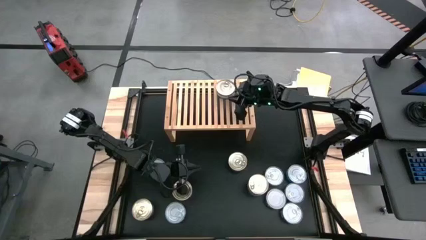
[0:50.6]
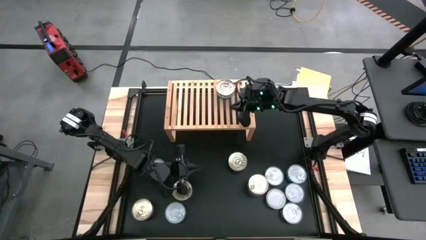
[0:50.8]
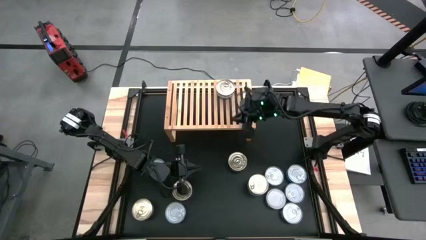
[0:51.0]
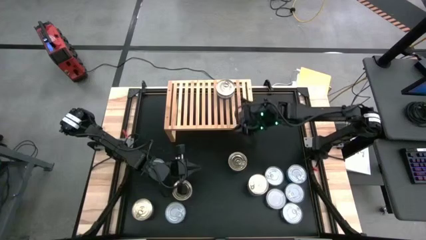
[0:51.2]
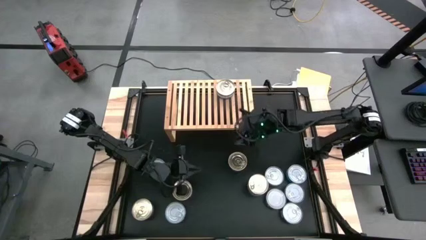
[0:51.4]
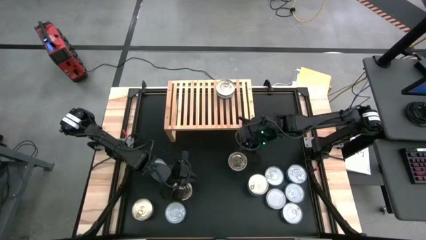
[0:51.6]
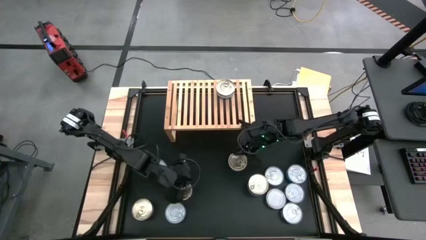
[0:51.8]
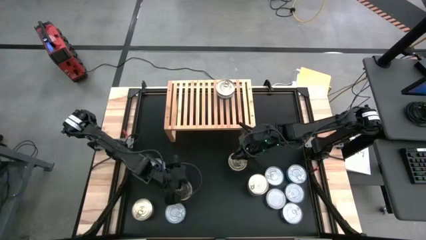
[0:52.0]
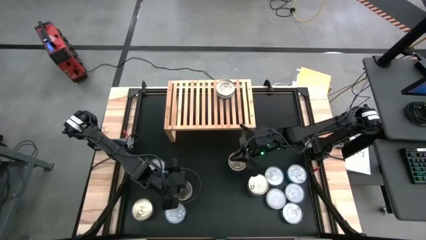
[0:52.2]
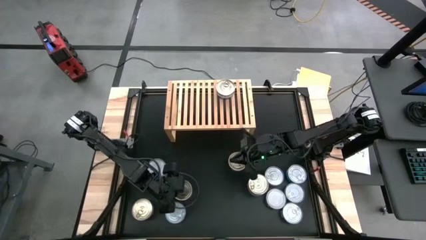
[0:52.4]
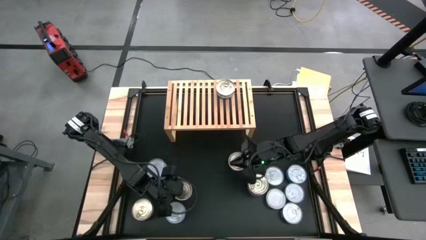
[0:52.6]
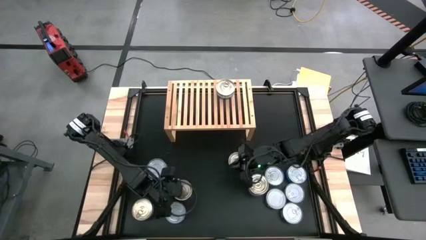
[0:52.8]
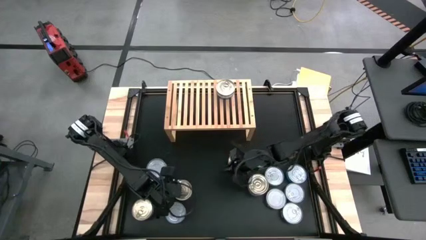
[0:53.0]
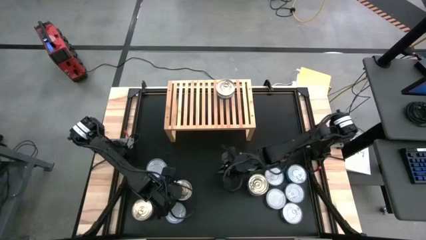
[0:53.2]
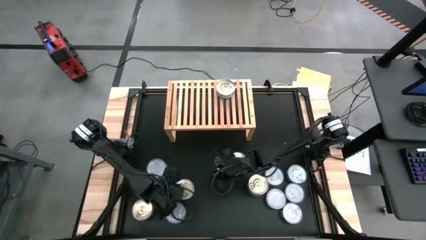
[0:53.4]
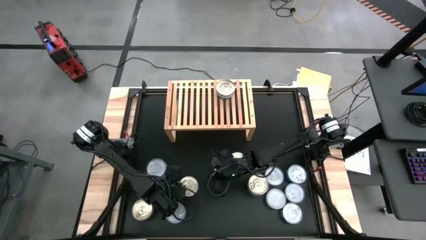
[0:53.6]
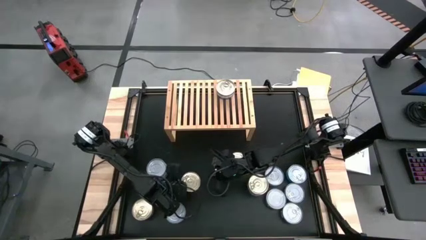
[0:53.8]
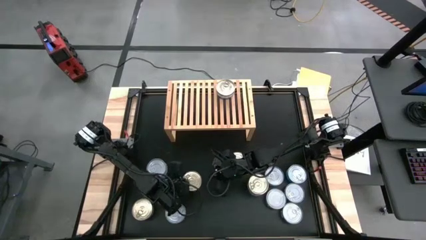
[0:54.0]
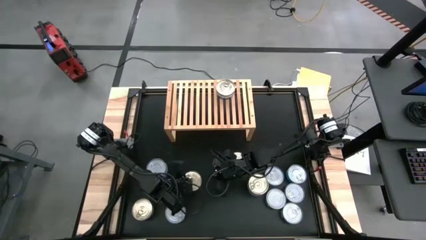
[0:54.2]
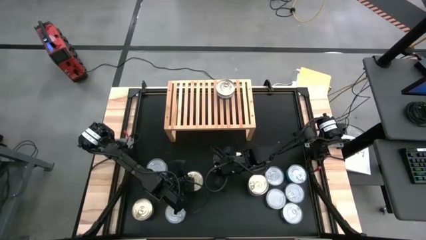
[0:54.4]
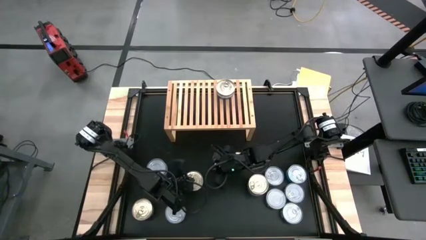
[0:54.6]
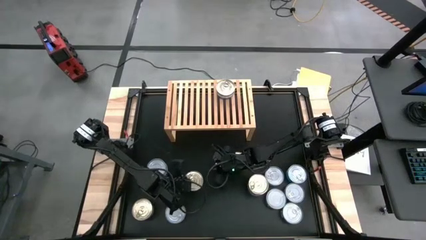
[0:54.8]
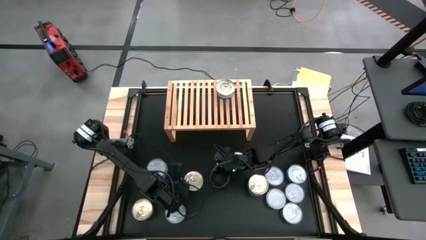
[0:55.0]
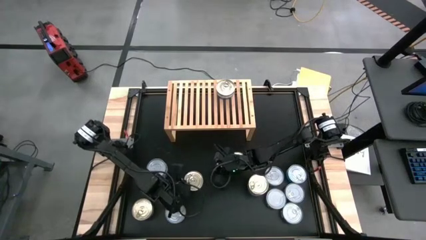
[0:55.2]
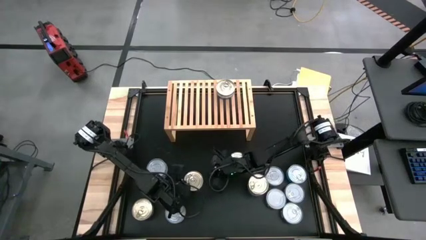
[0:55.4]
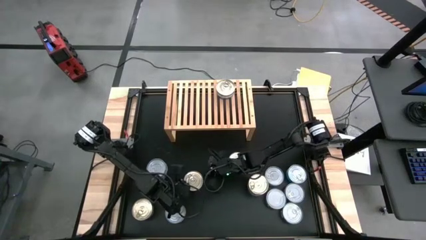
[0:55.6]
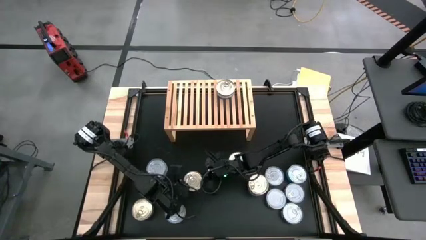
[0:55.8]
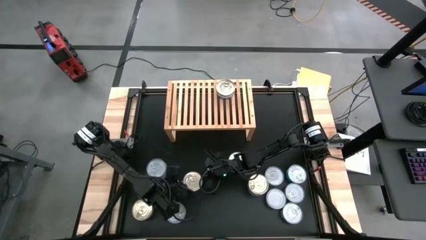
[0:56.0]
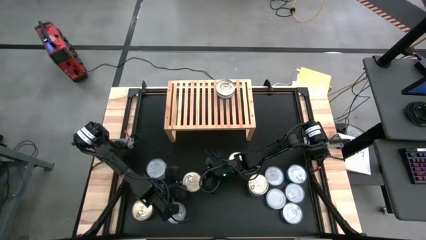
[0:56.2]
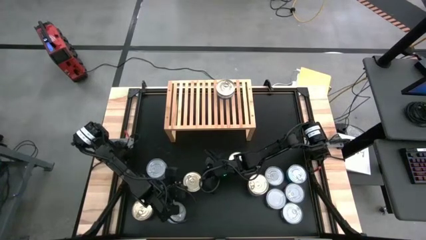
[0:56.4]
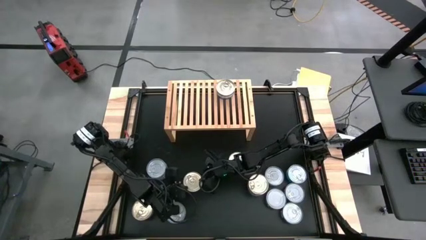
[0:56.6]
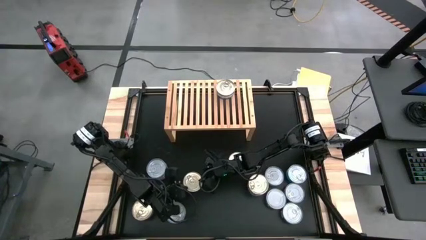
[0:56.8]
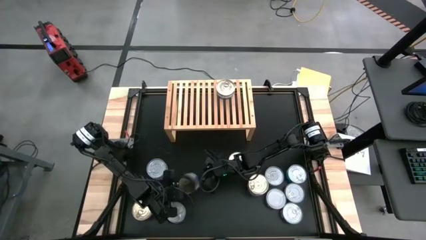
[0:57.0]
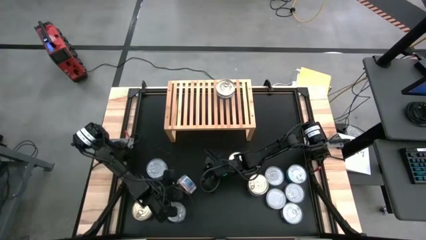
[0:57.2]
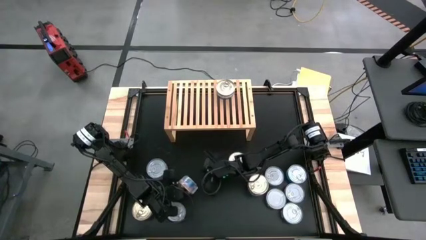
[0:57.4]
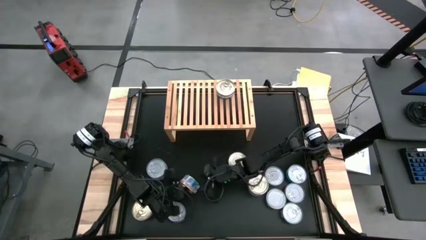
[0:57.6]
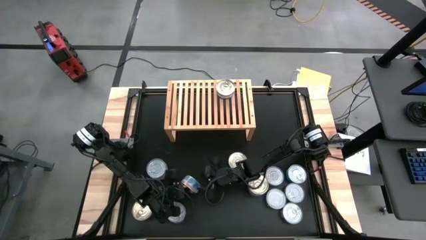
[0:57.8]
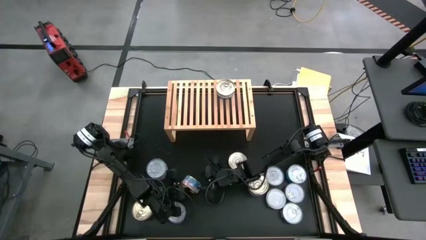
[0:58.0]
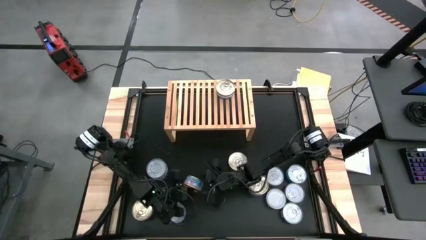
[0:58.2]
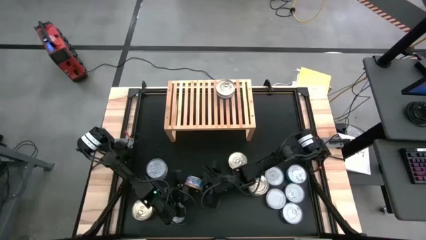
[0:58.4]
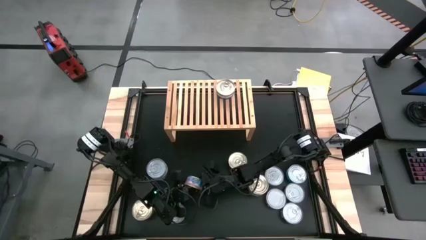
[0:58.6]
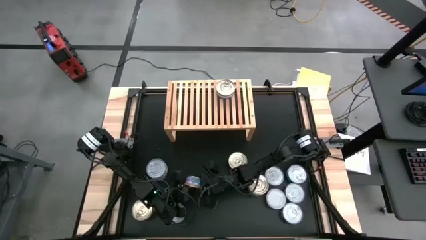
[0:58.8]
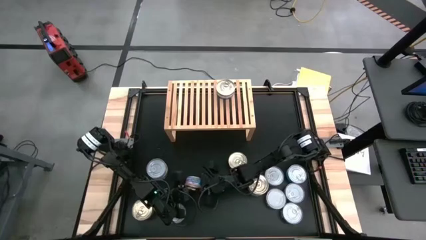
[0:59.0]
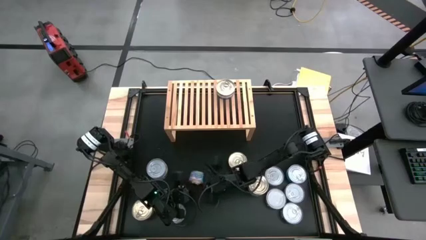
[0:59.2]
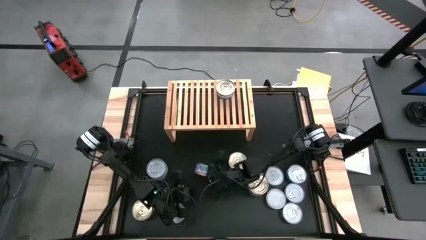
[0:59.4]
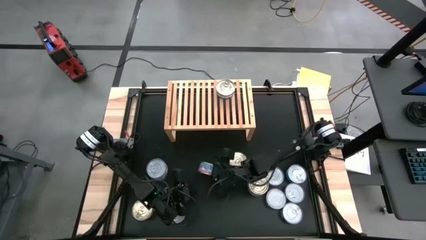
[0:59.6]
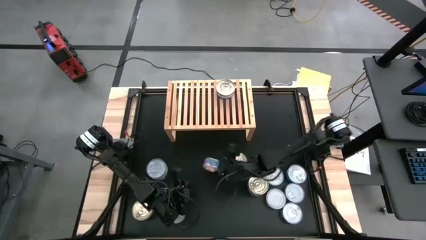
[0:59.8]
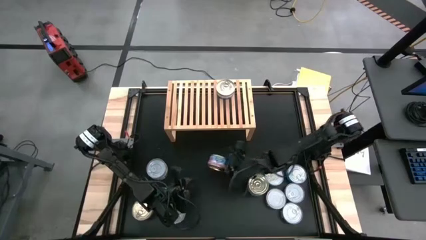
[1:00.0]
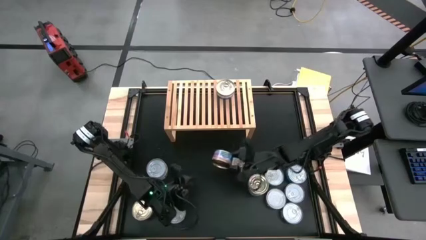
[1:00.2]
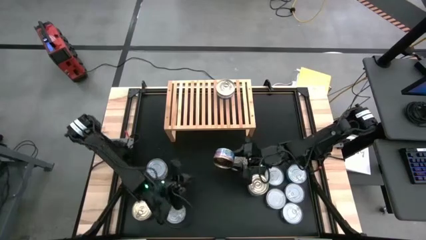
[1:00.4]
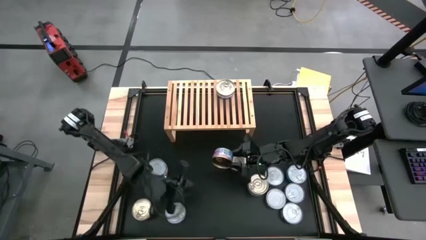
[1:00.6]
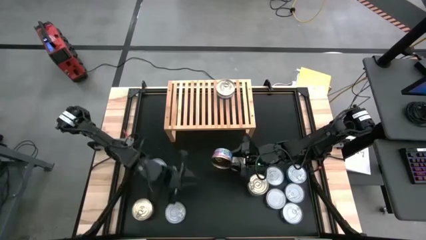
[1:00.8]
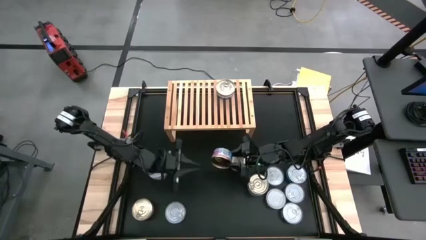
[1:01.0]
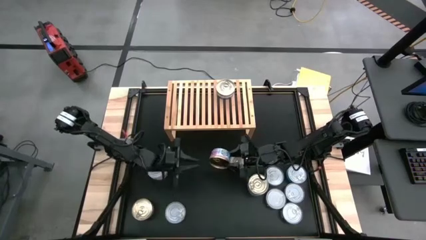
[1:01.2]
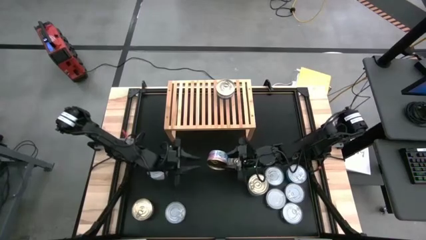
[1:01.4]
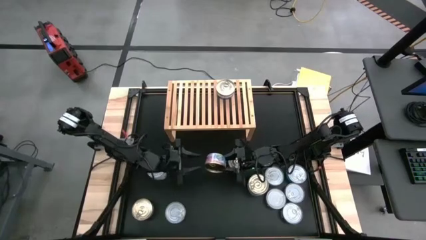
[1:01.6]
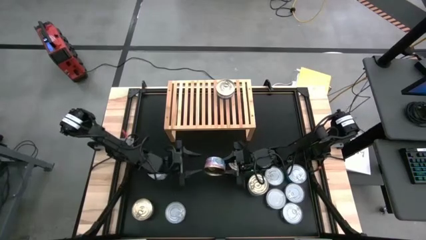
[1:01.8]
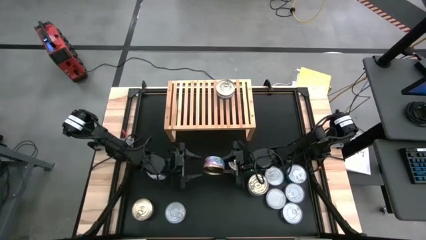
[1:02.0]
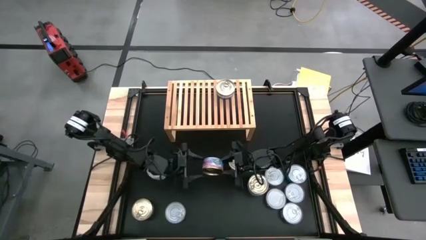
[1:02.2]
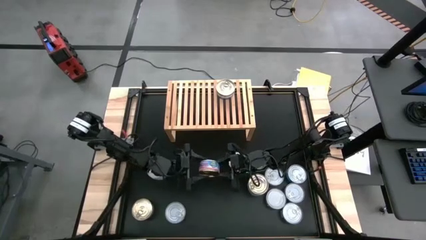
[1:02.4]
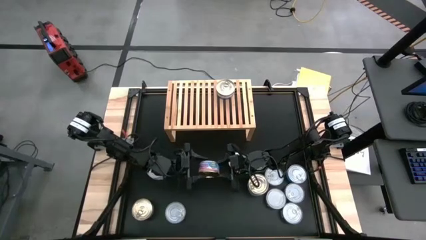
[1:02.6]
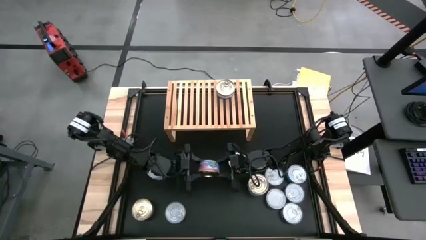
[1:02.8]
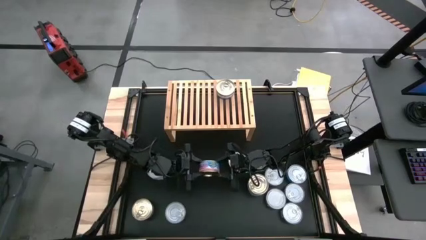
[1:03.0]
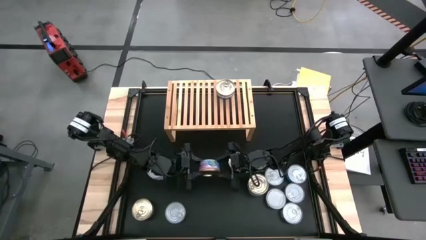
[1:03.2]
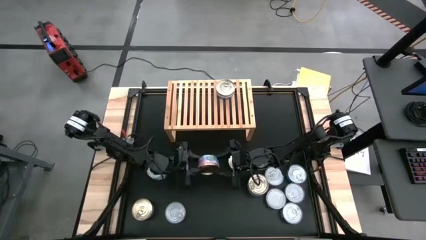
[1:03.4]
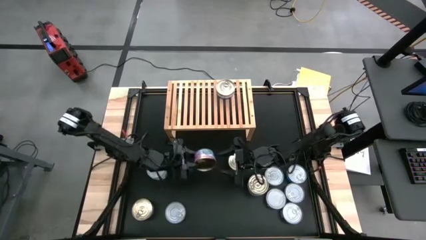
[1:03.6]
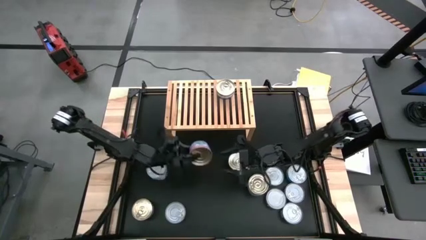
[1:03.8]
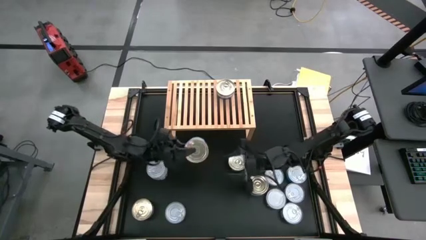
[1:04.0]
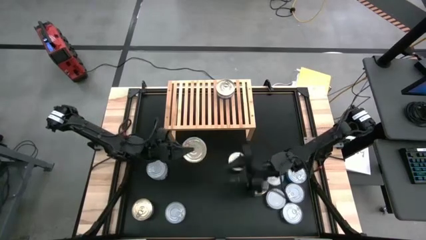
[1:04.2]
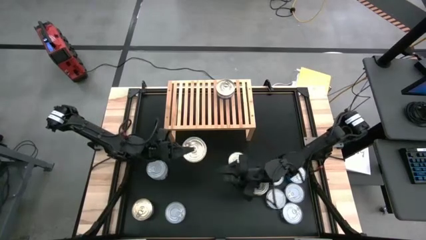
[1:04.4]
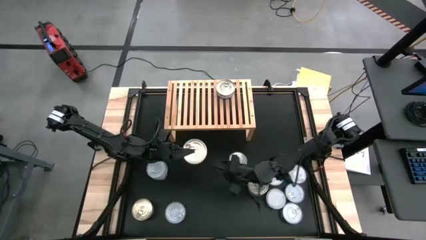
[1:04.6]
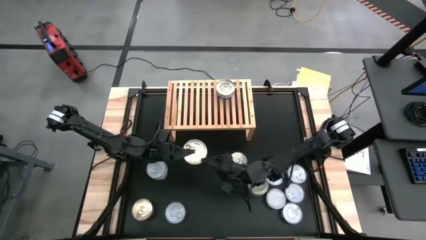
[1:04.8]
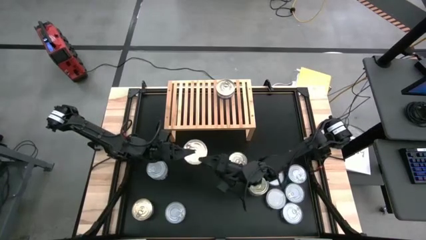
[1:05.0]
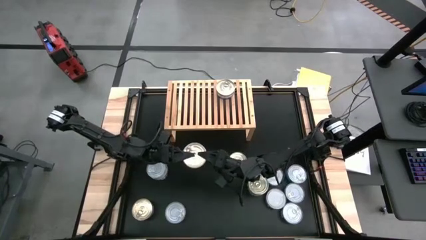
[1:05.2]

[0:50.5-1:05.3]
Task: Stack canned seafood by type on shelf
Stack the blue and pink tuna can on top of the blue and pink tuna can

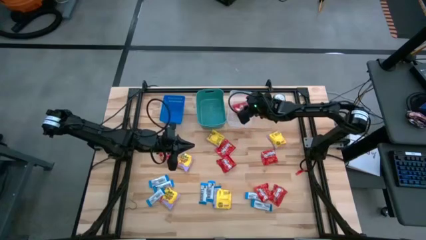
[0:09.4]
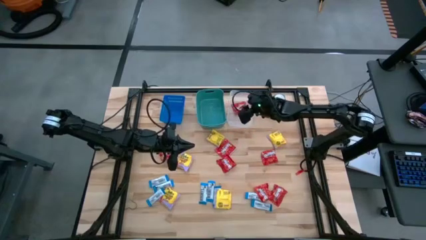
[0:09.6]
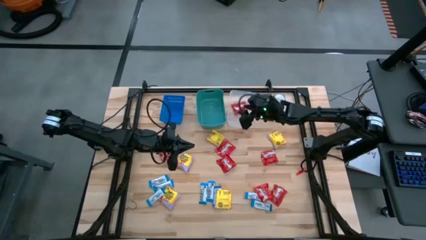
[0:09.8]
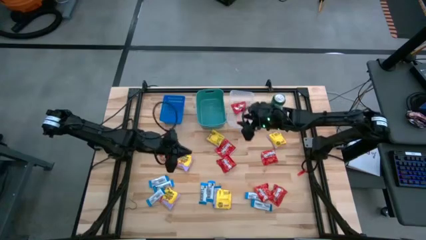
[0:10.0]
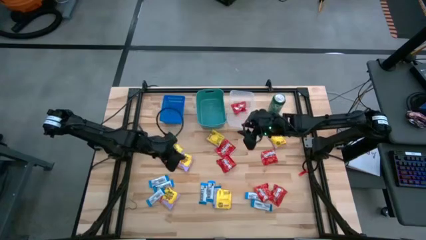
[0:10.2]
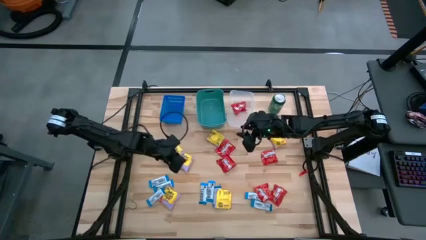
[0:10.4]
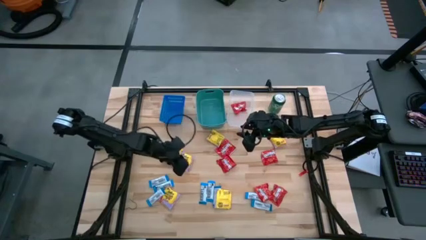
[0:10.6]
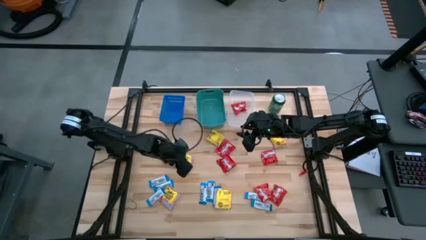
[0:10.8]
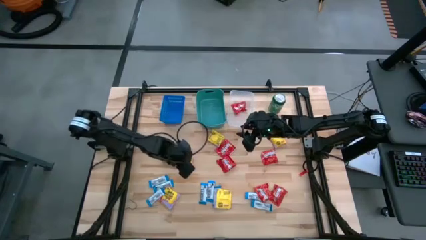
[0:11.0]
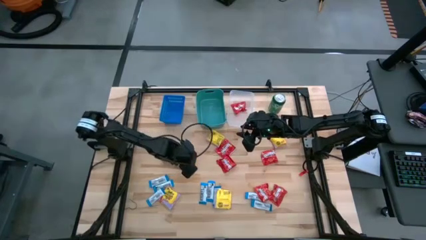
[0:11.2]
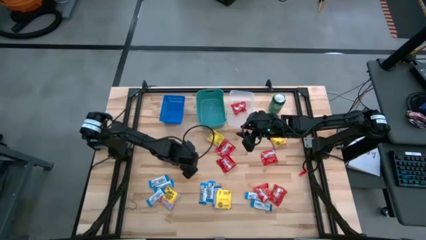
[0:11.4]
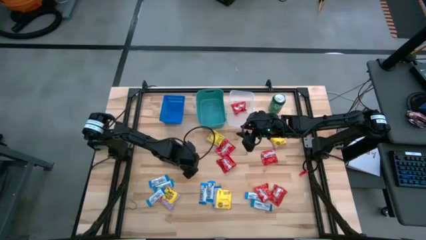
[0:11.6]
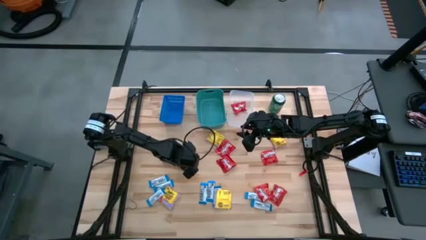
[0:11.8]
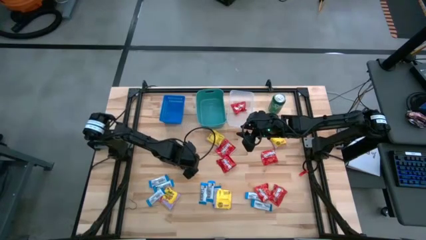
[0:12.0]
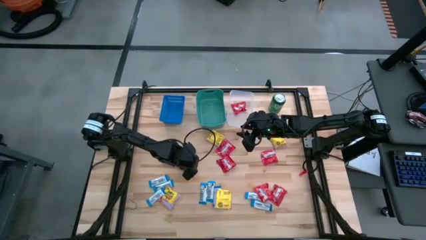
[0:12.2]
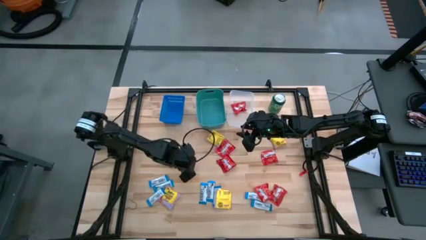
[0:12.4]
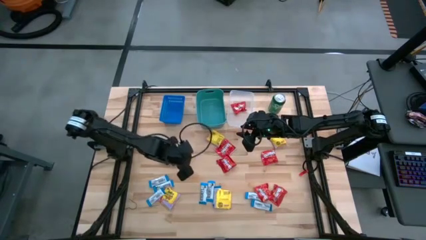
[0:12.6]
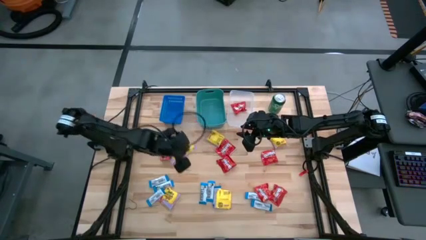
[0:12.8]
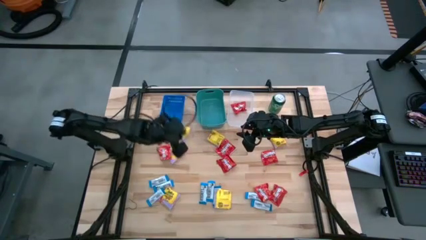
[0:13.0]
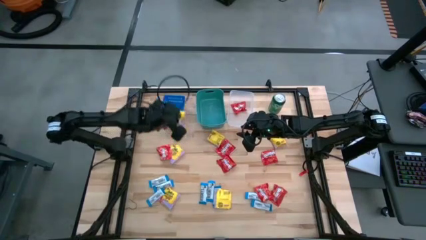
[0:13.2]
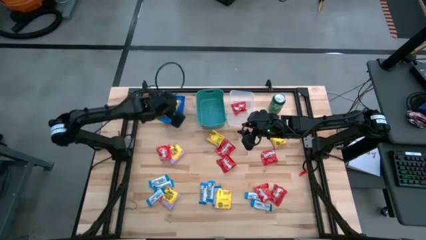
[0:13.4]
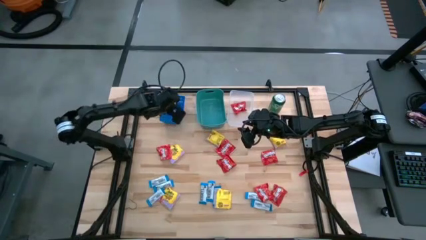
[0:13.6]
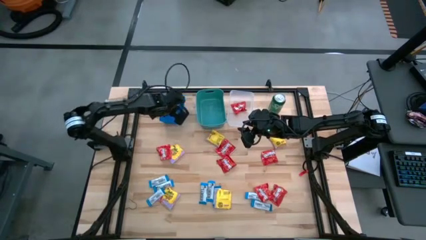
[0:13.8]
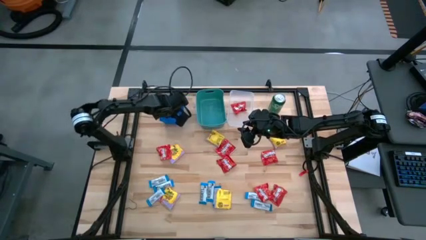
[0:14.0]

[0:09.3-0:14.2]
Task: Sort candy
Put the yellow candy into the blue bin
